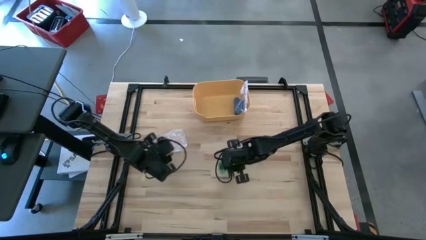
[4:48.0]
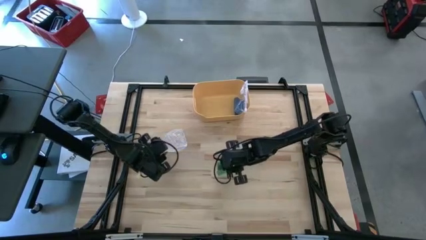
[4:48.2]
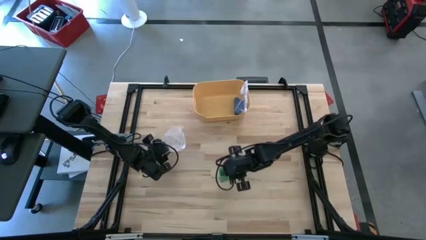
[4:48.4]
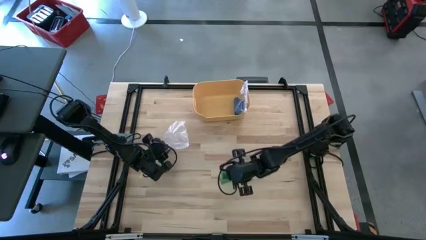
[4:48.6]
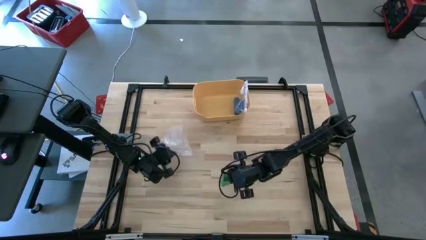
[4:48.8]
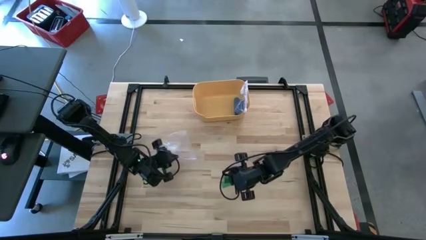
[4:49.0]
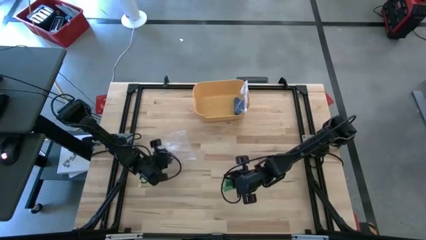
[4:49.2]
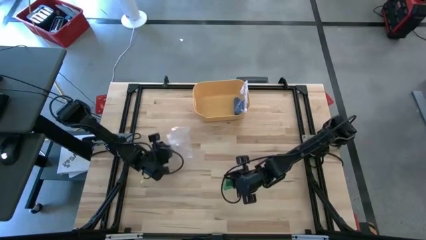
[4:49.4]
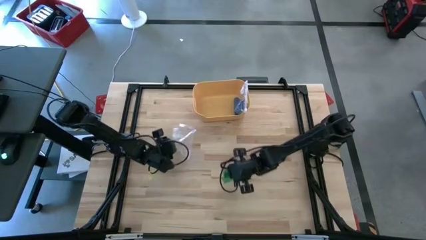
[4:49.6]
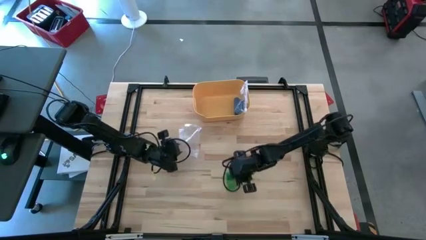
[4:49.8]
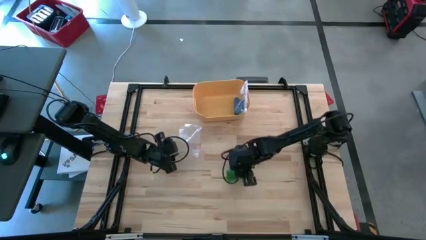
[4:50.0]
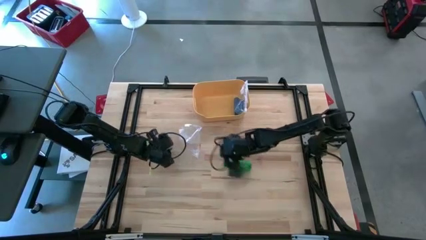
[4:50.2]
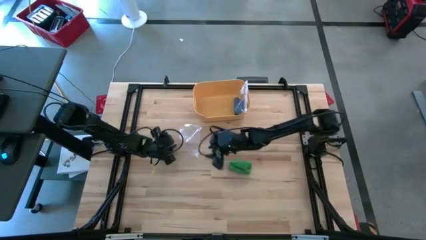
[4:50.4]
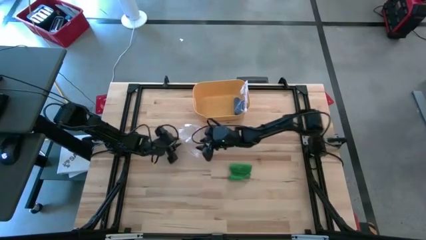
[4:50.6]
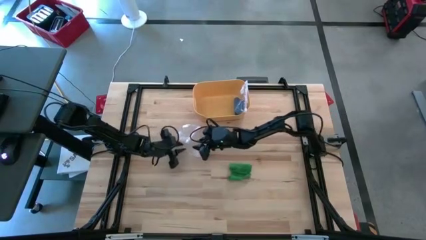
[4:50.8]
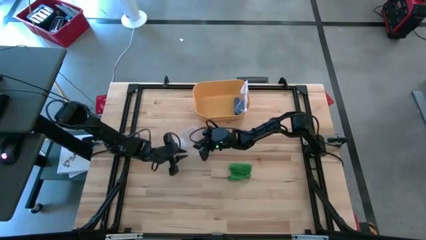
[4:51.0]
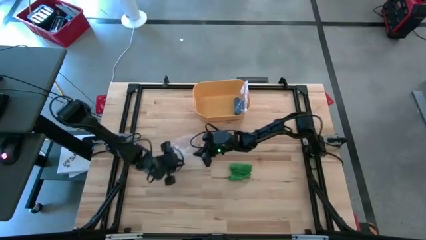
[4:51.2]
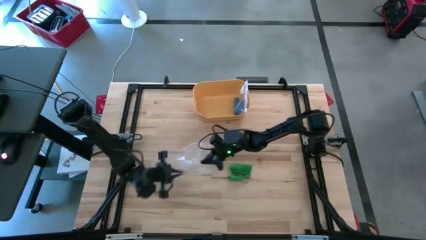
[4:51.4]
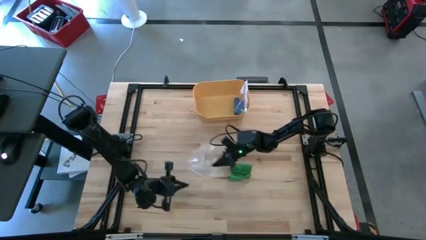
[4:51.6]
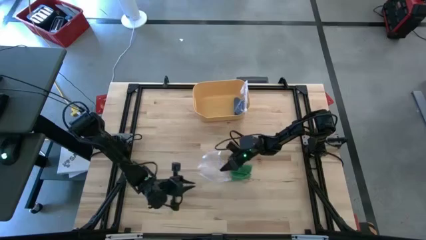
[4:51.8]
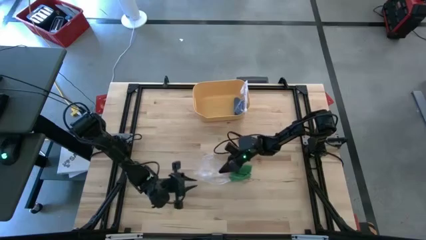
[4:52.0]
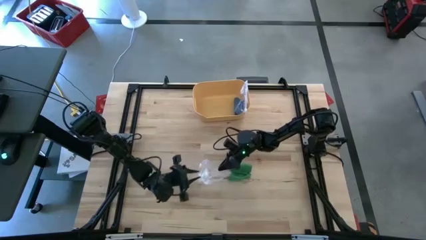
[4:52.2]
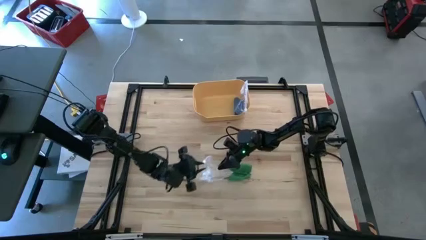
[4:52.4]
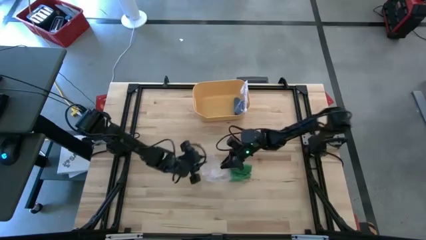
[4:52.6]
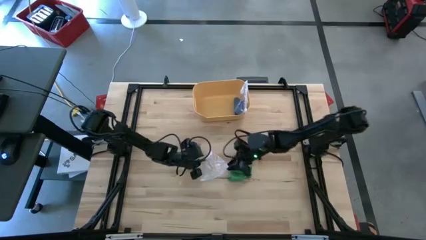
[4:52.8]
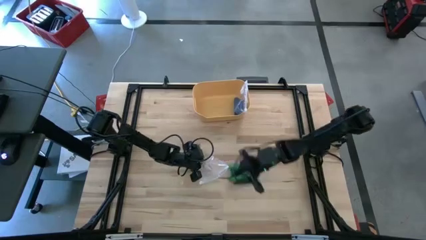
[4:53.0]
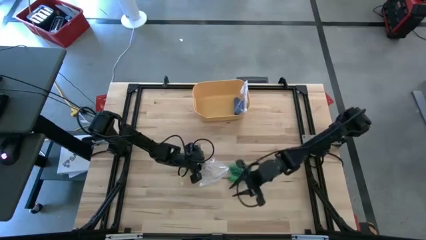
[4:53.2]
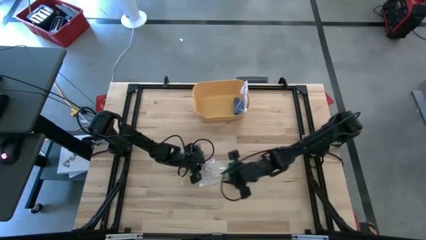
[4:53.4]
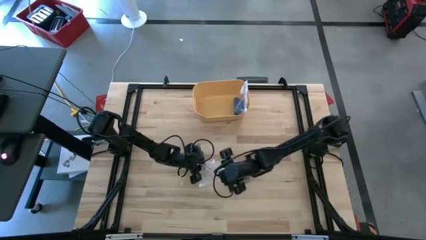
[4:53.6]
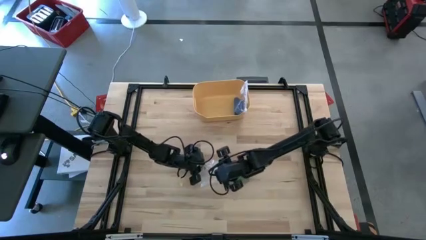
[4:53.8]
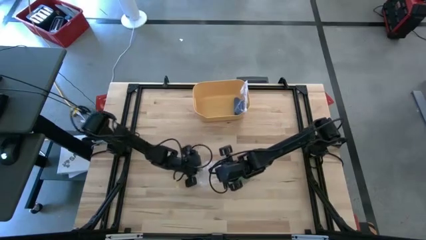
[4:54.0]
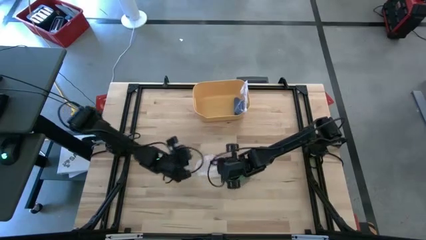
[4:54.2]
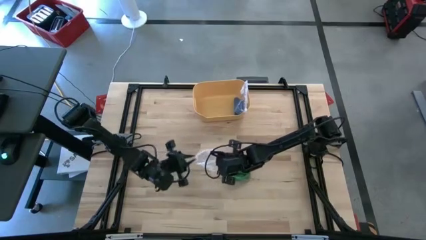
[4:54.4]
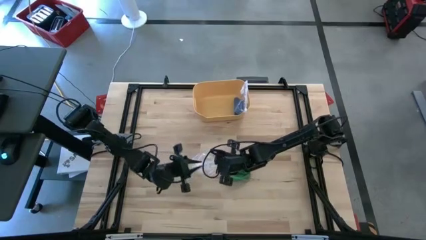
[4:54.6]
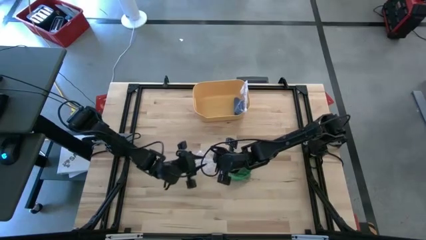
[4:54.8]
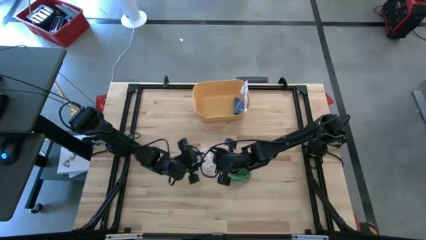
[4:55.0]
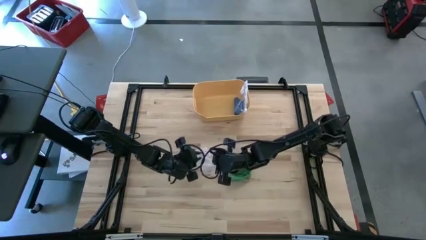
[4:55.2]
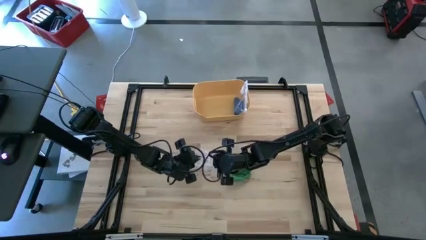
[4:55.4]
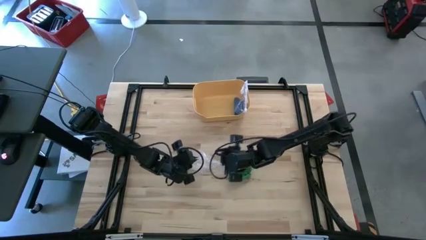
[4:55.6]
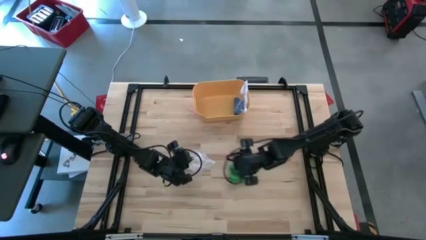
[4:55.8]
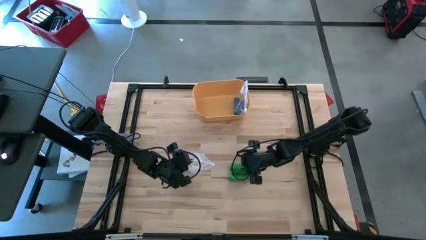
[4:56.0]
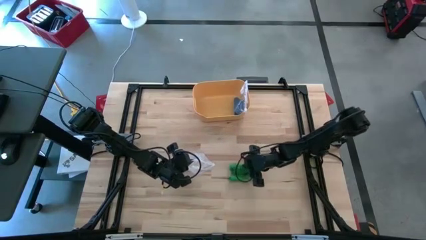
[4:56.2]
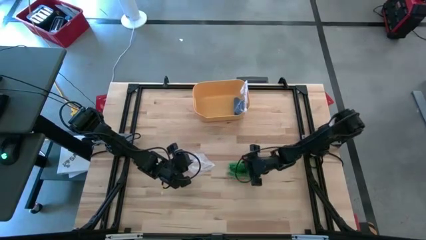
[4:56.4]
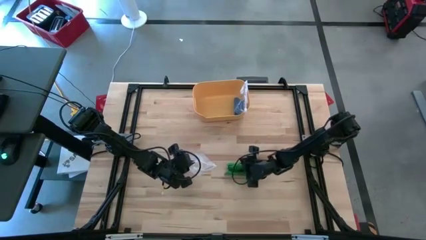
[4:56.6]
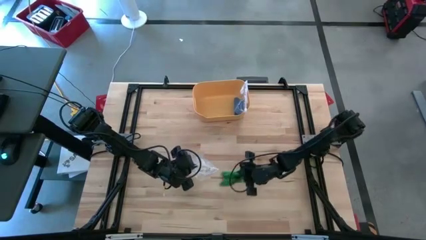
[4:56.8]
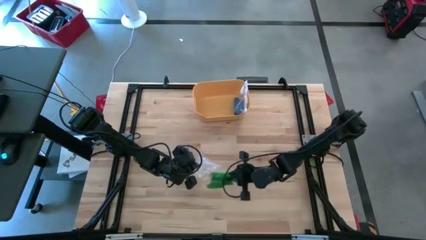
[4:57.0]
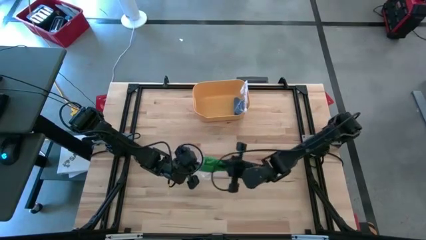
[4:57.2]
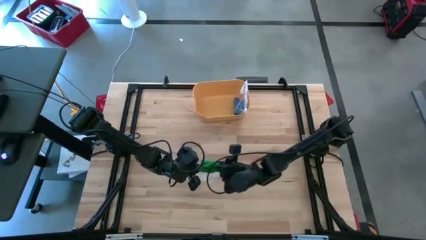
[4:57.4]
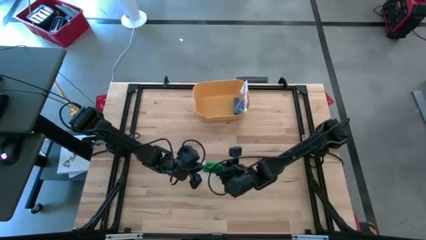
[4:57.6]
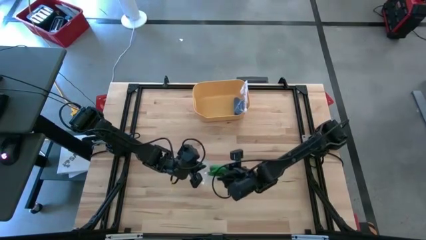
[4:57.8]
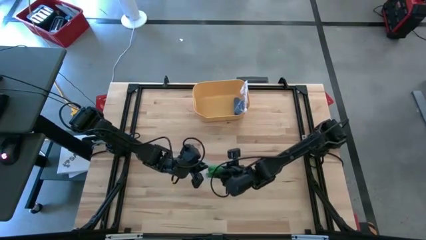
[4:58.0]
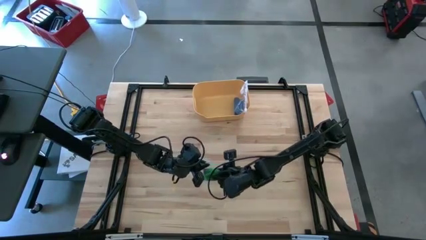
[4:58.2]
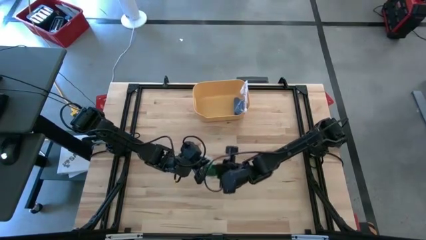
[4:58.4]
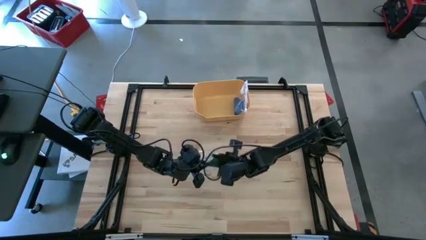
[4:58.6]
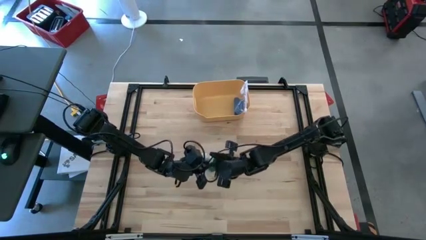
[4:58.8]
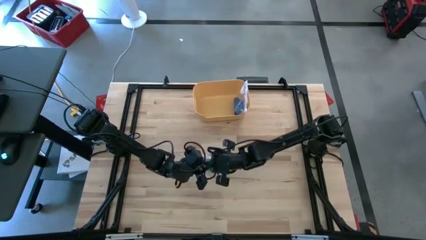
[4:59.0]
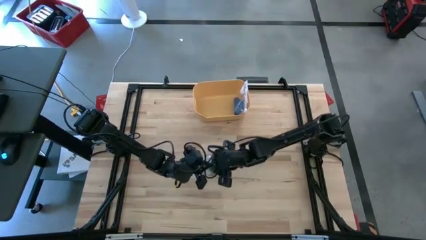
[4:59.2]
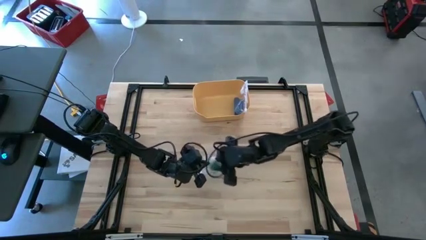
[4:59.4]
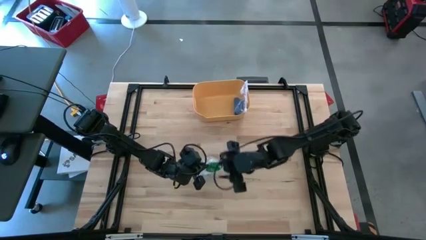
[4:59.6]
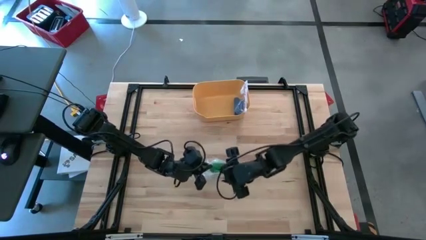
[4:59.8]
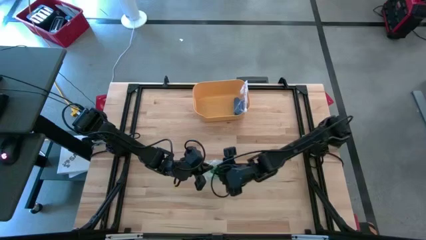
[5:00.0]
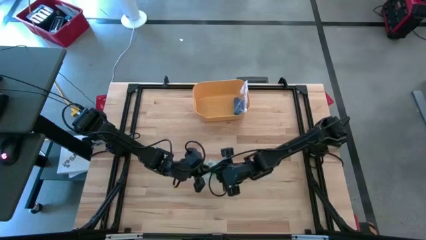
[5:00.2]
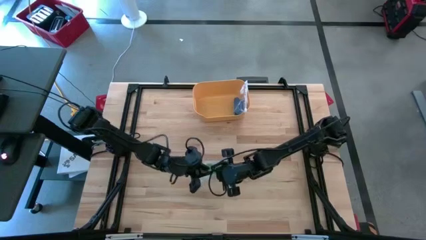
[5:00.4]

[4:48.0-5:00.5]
Task: Roll bandage
Put the rolled green bandage into the transparent zip bag

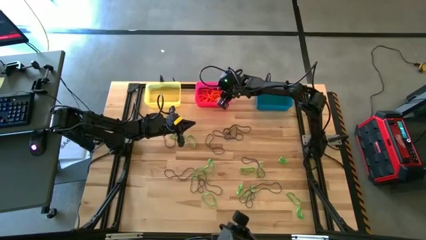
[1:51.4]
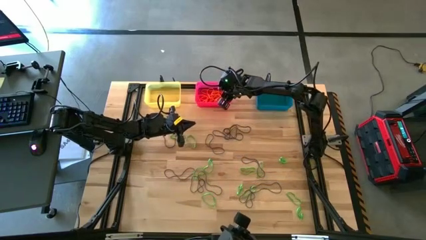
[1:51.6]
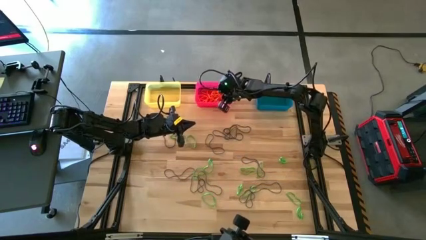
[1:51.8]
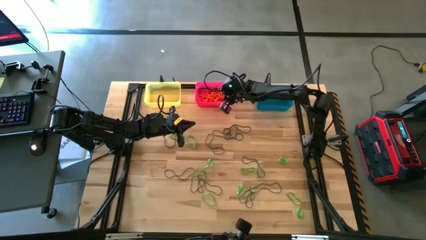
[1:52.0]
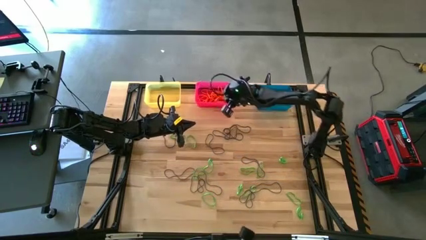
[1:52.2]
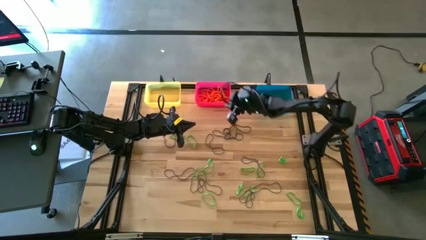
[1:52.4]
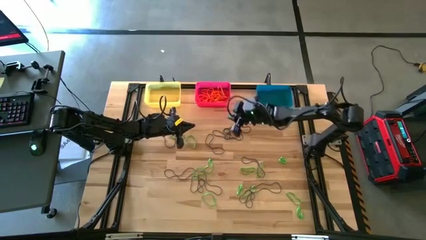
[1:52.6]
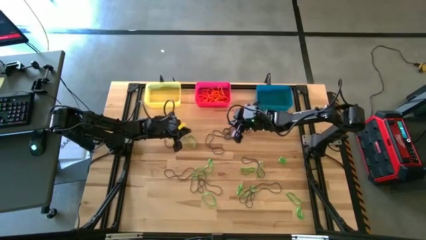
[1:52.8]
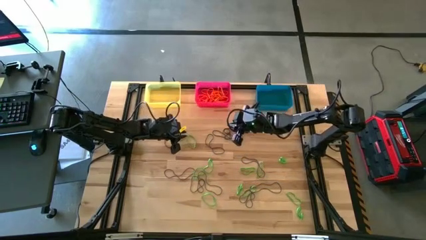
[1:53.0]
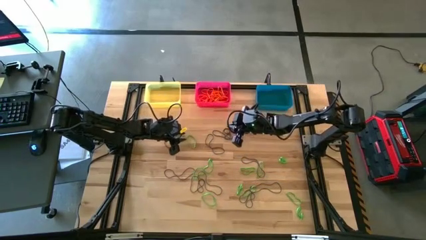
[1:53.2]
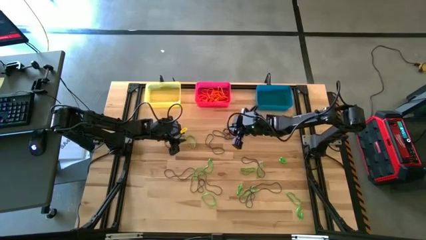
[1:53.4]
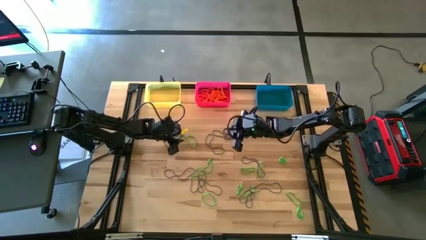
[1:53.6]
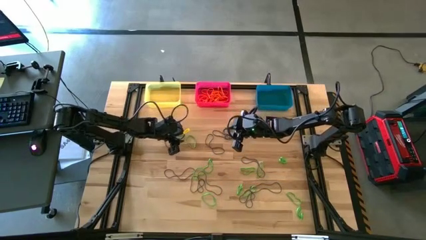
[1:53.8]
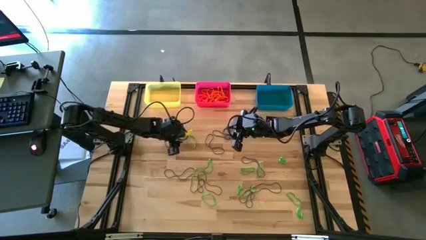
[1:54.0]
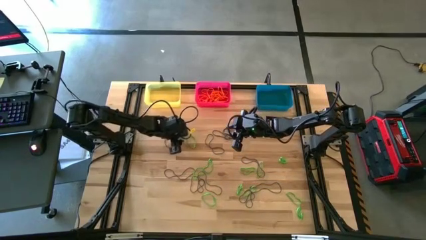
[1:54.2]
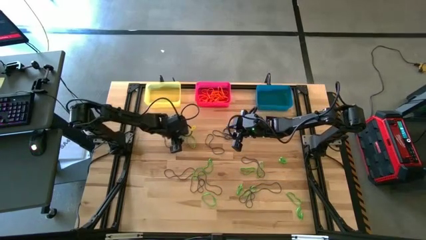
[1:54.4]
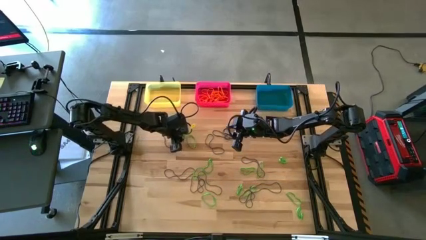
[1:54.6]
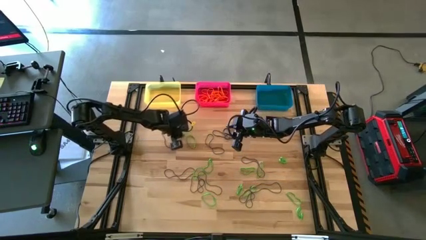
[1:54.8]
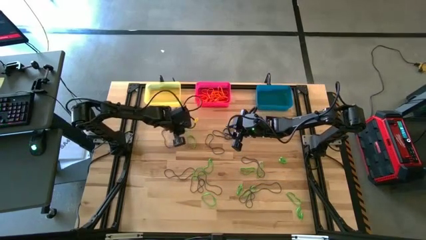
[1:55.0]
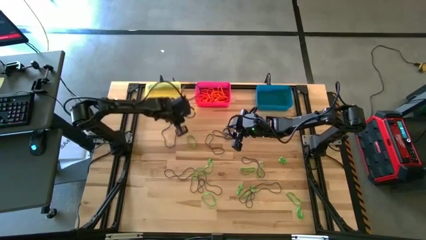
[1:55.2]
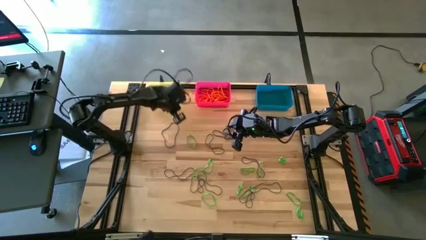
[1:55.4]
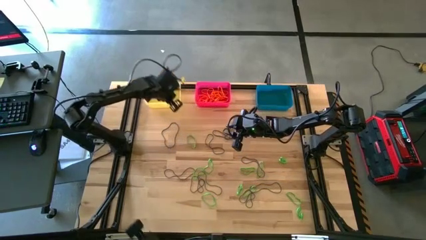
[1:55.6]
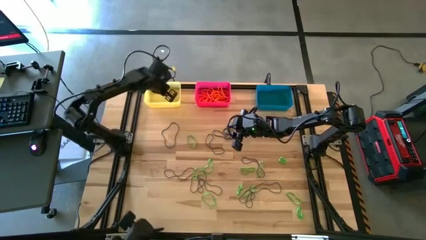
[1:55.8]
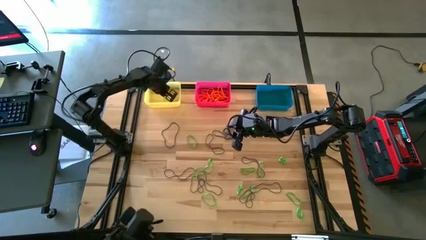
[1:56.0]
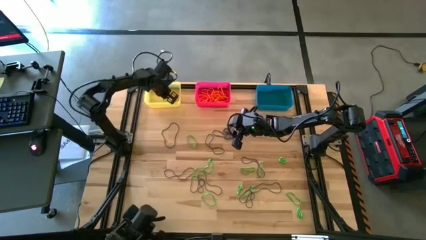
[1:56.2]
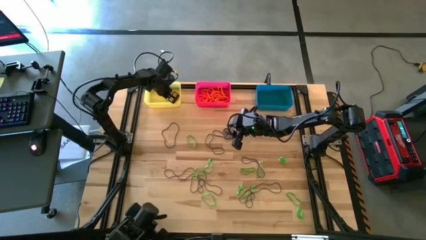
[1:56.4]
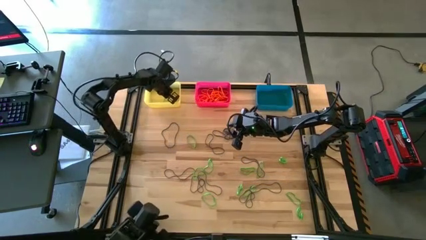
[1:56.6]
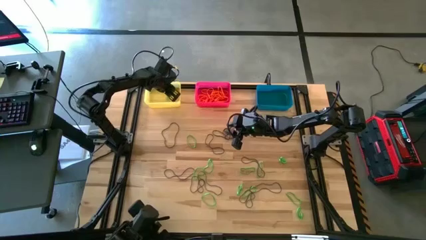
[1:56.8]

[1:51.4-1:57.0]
Task: Sort rubber bands into baskets
Put the green rubber band into the yellow bin
